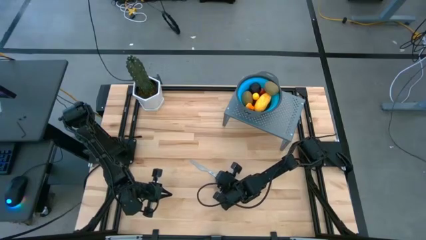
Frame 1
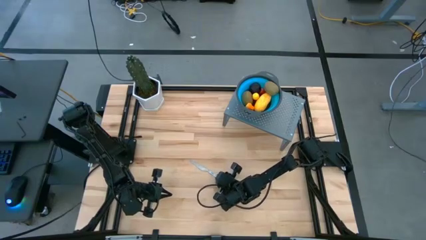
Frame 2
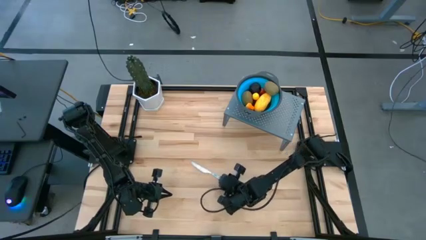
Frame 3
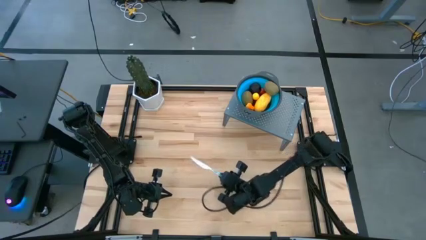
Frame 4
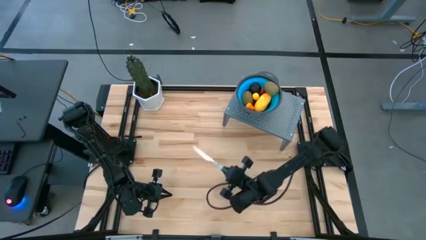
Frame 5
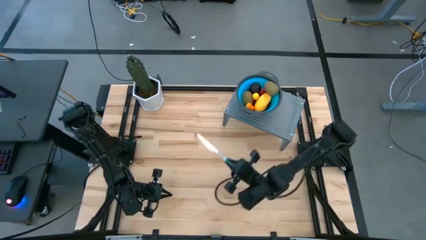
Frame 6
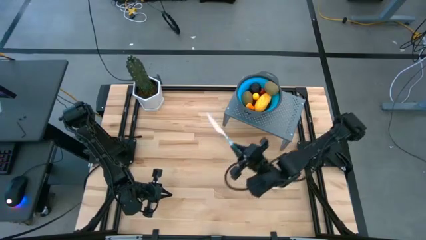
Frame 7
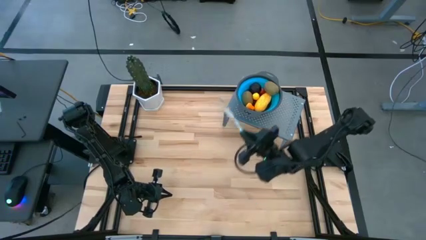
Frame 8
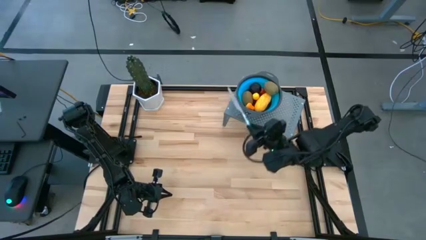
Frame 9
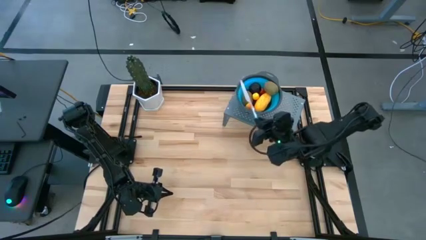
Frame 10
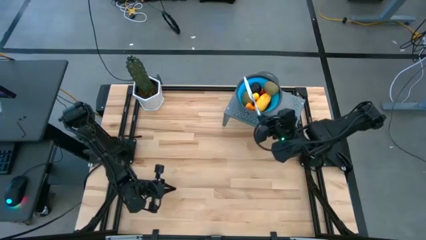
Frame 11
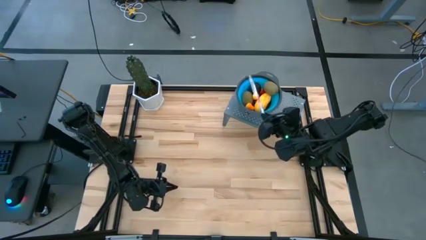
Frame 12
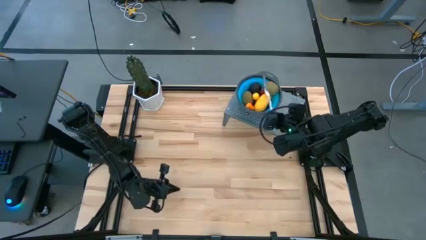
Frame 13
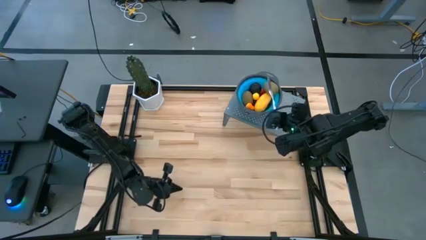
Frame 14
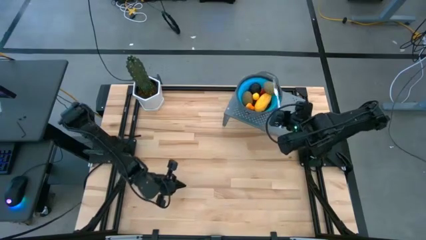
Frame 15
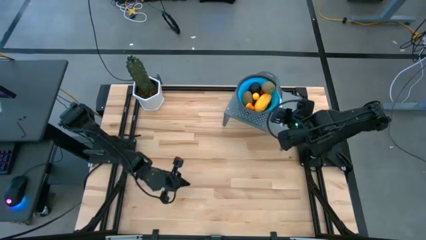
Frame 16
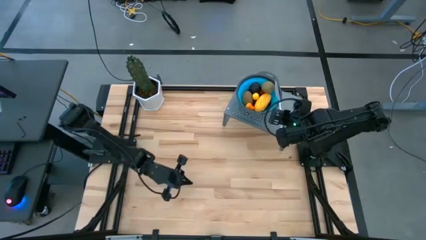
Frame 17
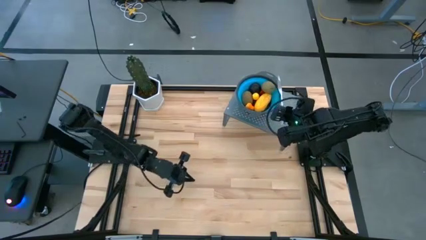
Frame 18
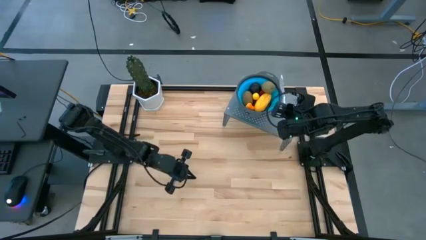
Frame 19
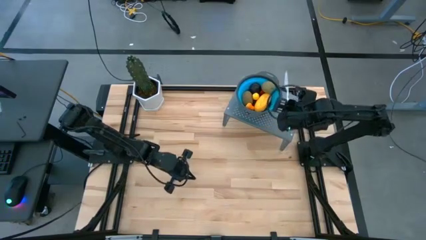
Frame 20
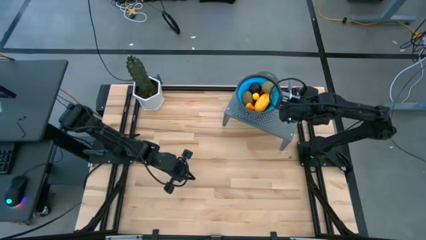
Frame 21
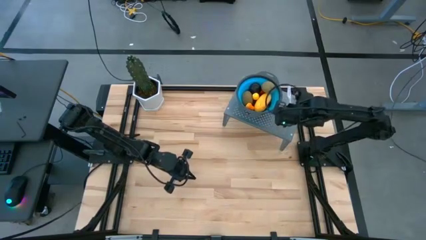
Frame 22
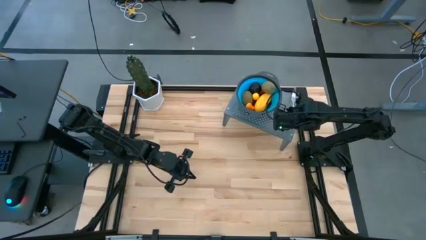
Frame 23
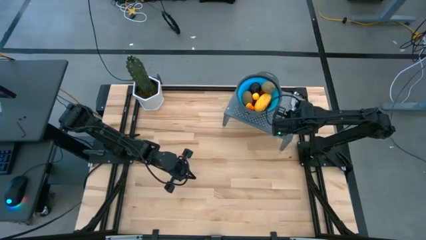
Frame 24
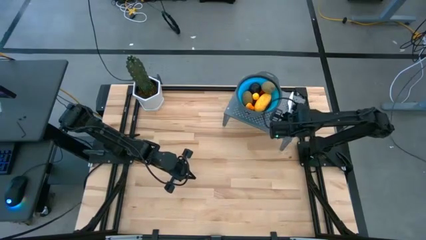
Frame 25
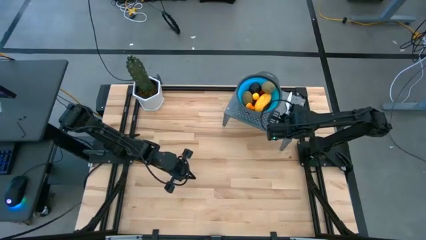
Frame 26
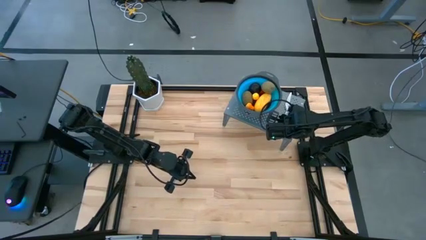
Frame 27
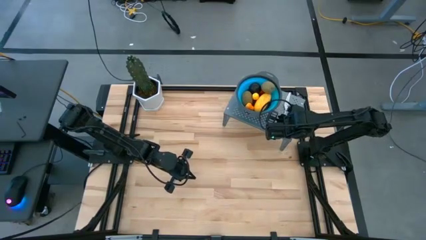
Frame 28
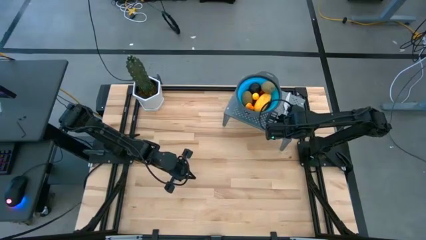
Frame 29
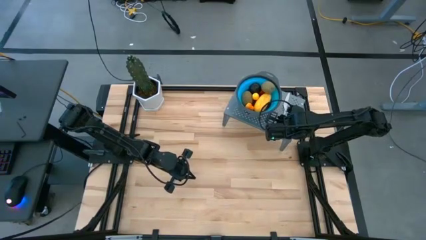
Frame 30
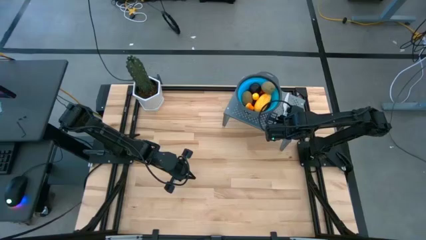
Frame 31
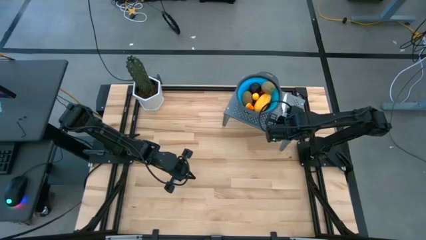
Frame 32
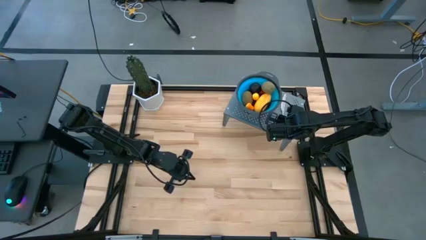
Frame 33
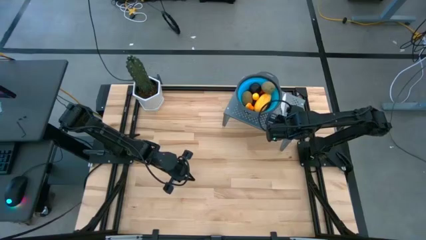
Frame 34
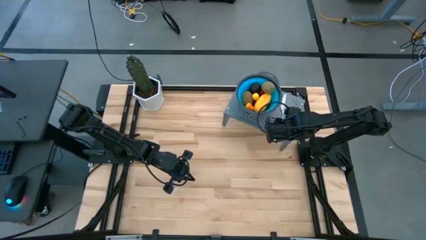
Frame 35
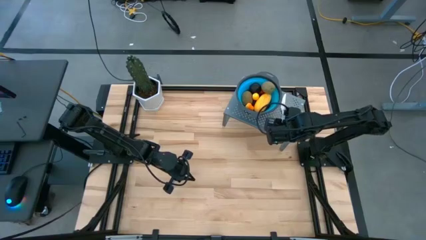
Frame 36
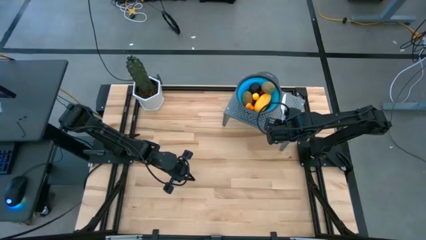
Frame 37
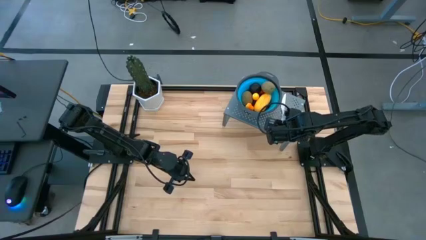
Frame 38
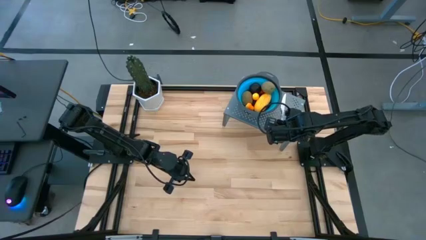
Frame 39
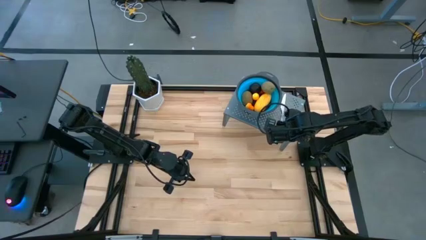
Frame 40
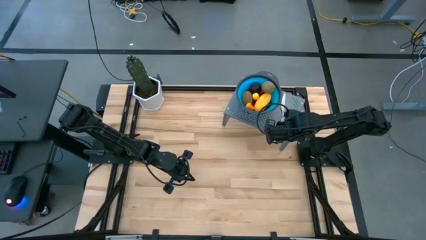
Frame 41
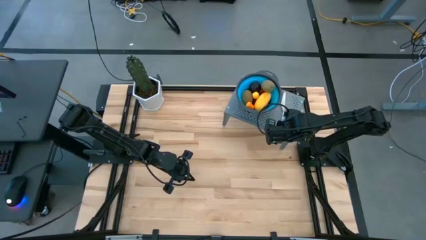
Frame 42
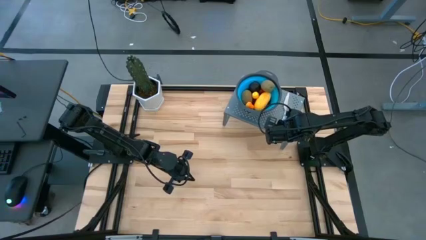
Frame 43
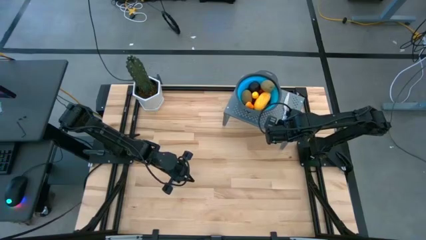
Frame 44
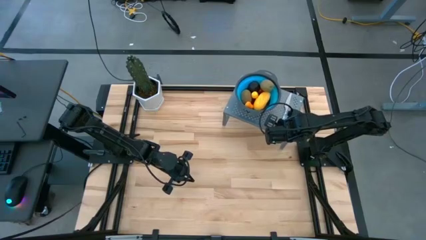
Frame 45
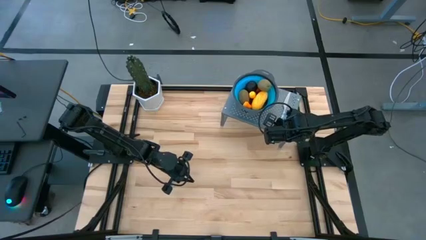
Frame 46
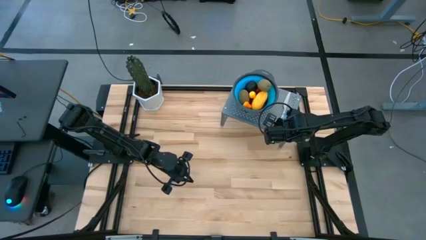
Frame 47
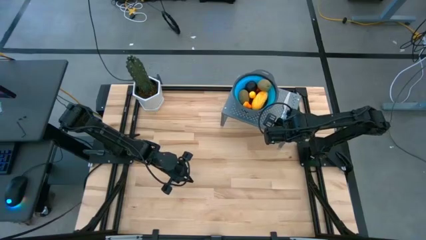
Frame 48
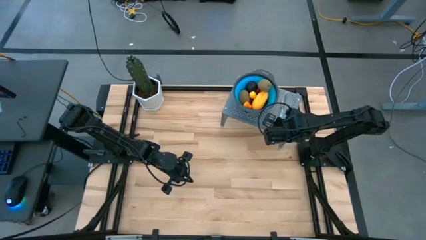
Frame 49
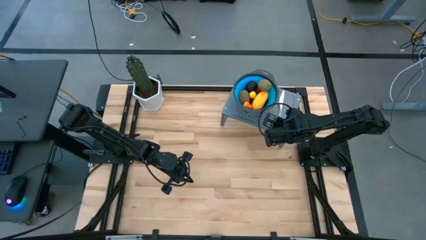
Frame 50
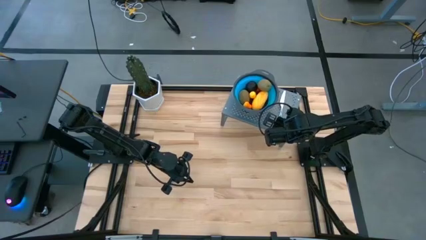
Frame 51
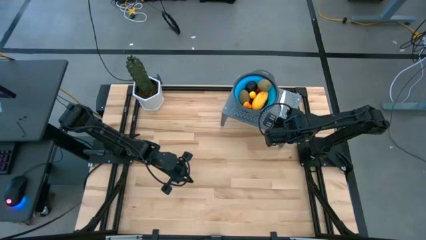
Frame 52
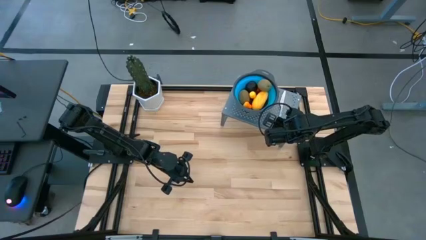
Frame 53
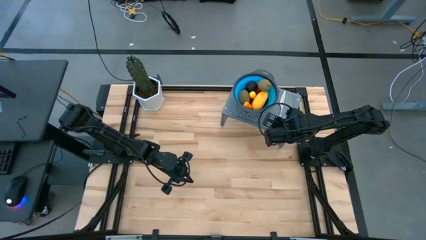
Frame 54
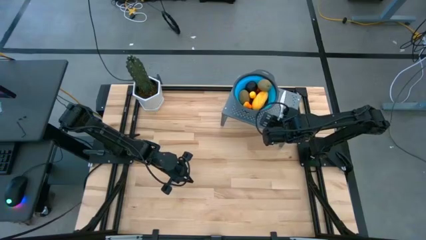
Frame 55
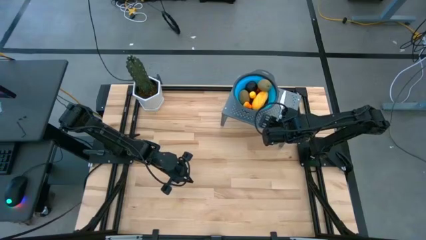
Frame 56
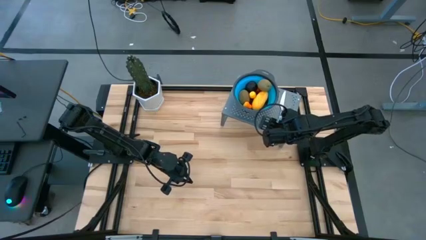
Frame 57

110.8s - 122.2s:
Task: Pick & Place Fruit
Put the green table knife on the shelf

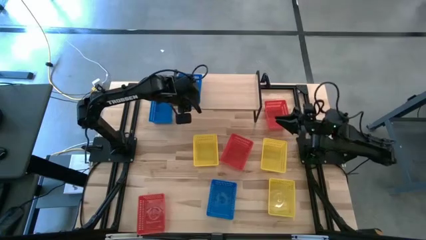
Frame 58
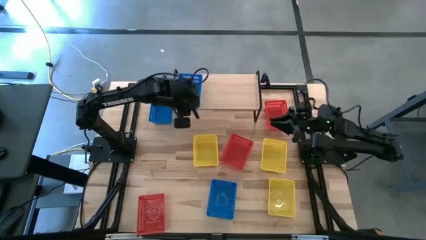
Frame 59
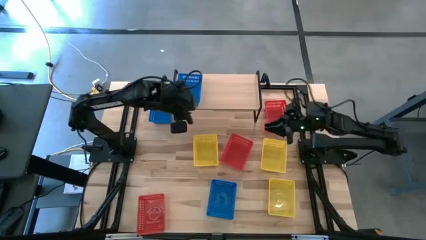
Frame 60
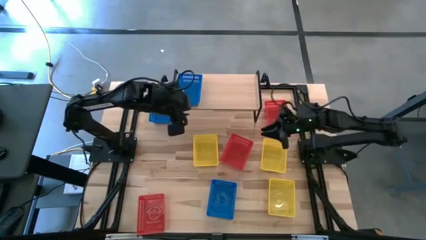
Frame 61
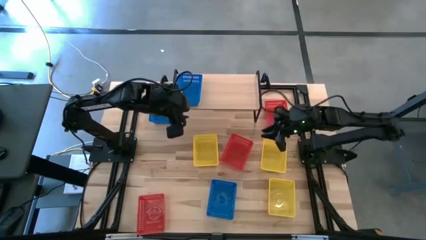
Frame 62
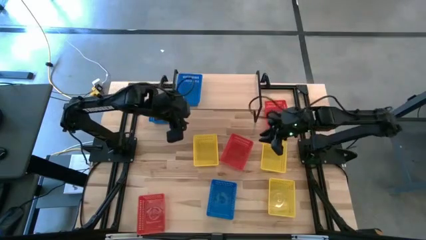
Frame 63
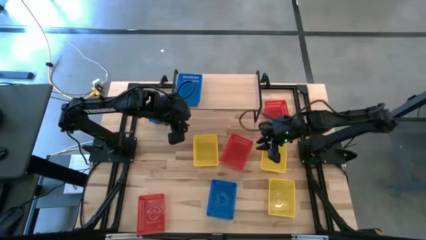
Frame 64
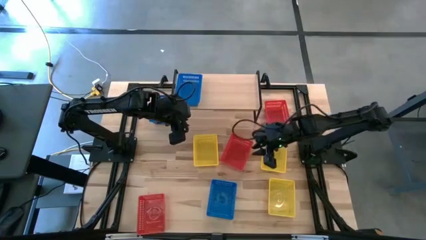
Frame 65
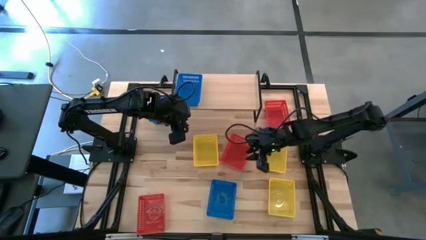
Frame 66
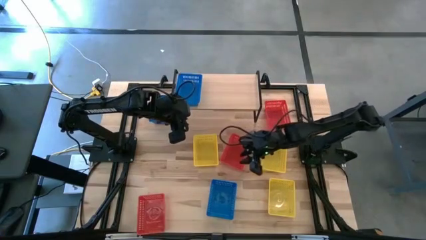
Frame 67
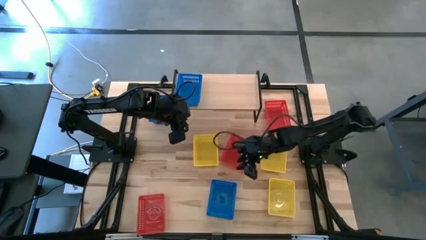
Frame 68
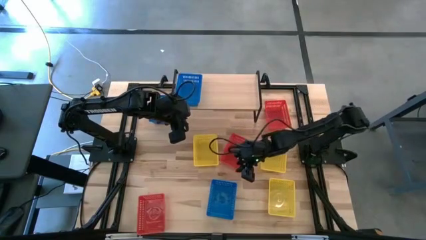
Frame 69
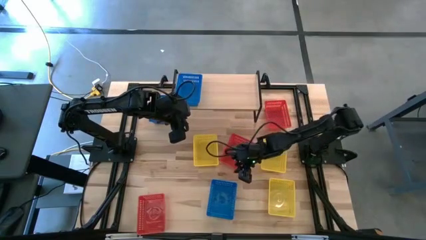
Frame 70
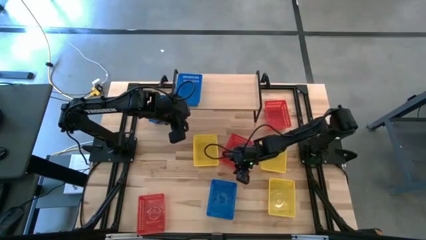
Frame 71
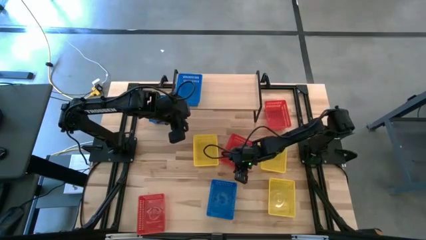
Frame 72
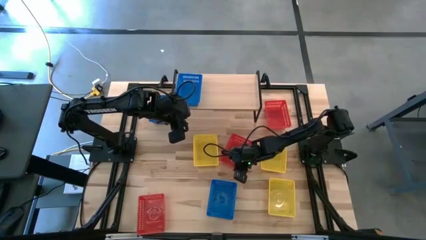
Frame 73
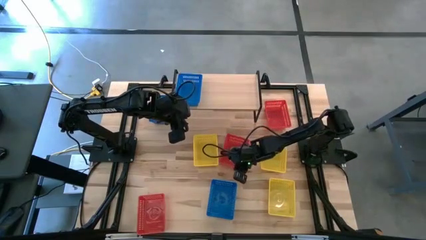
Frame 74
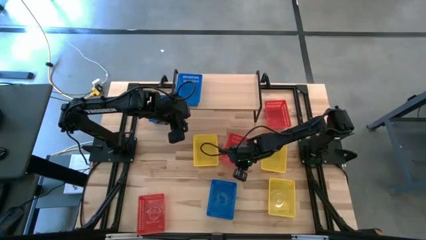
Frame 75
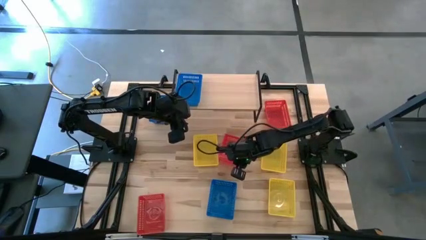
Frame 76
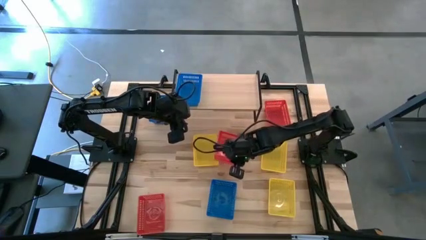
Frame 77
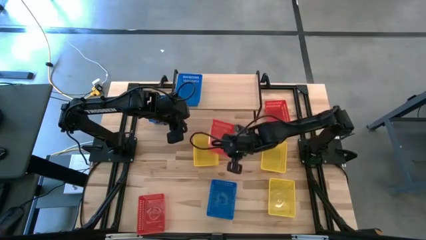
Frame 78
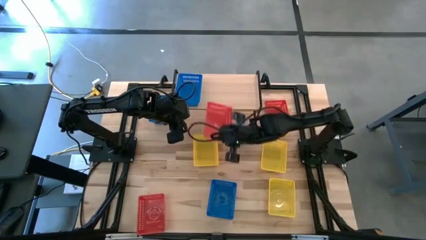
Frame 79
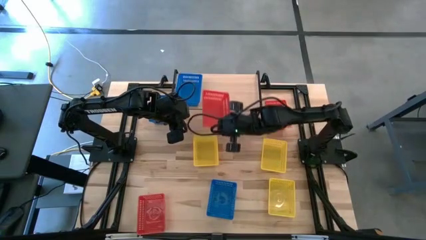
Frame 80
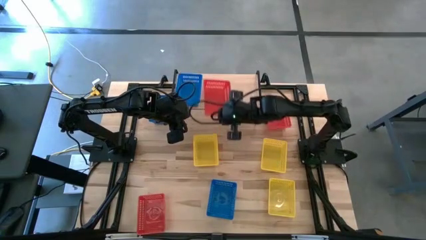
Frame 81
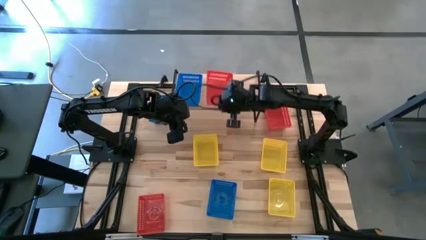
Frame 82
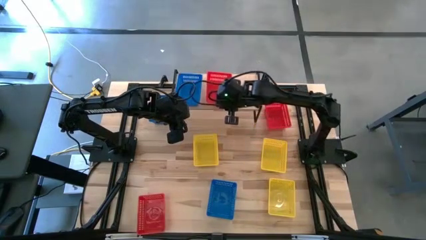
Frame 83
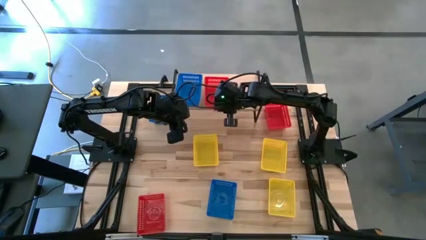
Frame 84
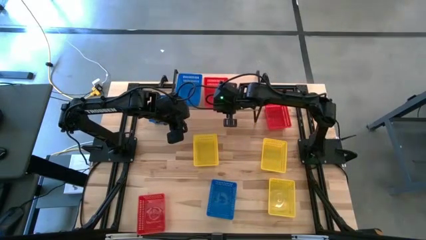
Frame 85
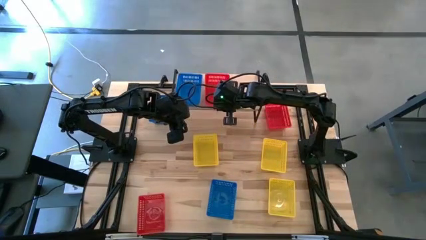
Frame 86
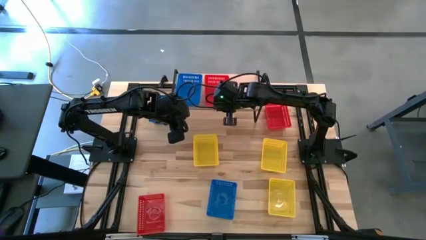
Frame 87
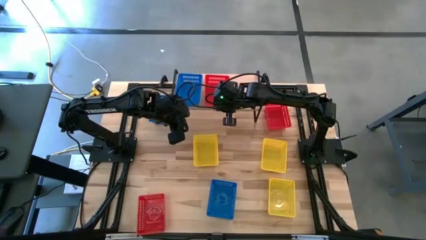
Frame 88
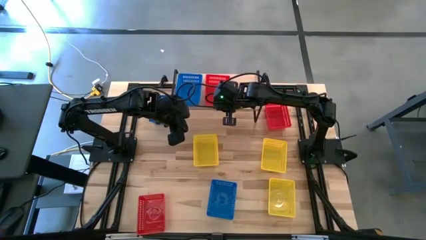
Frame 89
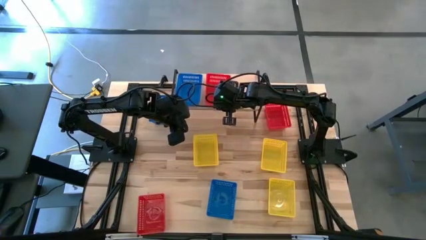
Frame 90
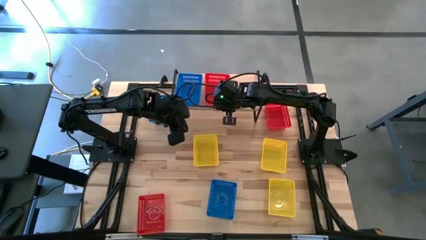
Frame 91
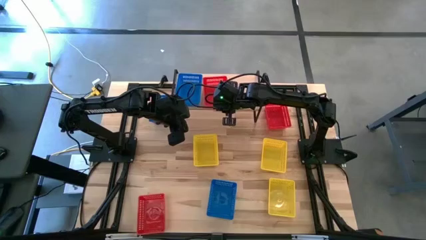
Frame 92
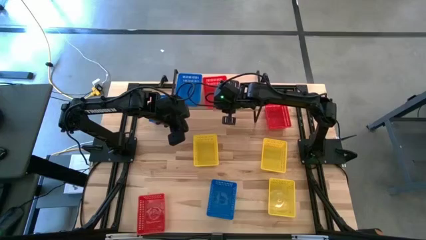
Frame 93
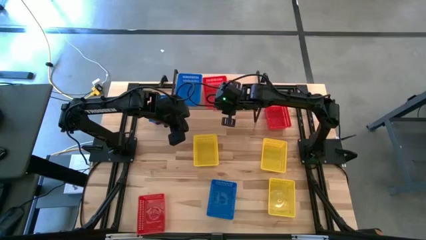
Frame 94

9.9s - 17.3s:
Task: Stack baskets on shelf by color
Put the center red bin on the shelf
